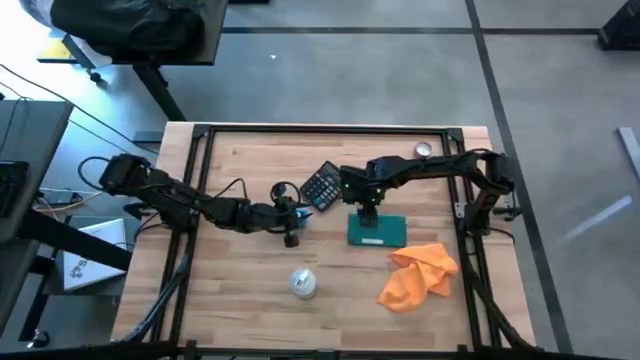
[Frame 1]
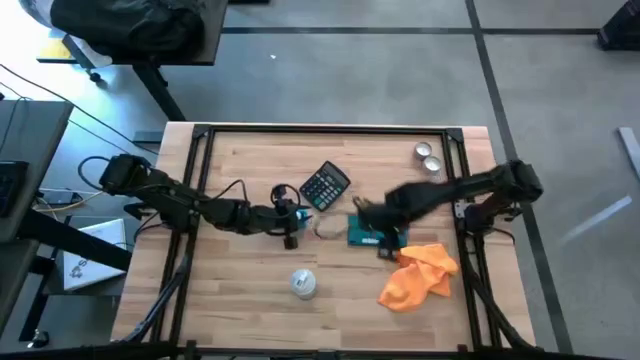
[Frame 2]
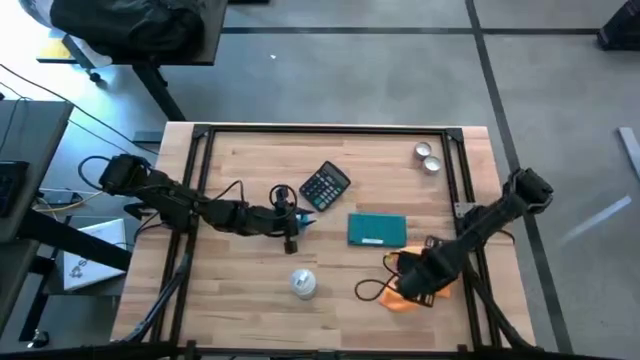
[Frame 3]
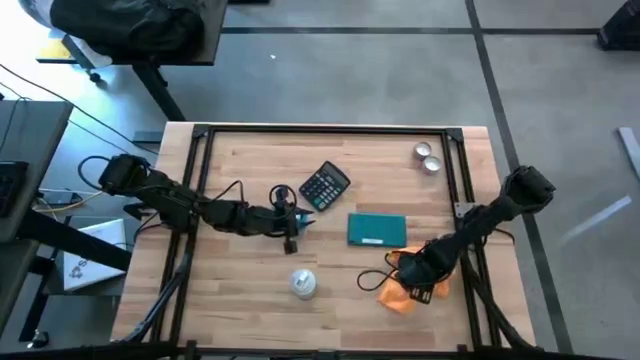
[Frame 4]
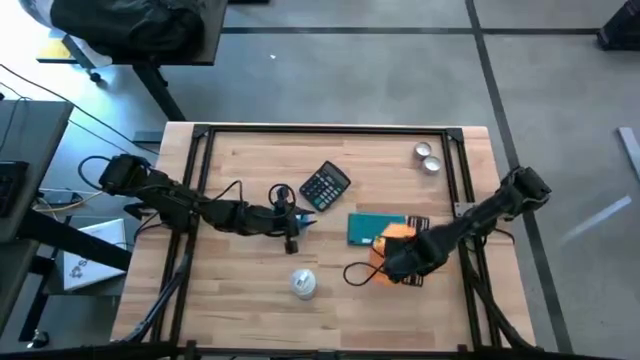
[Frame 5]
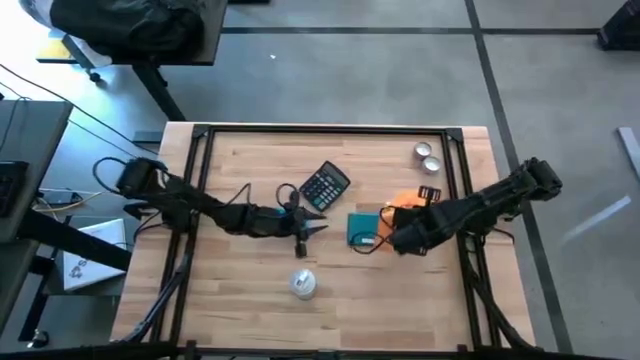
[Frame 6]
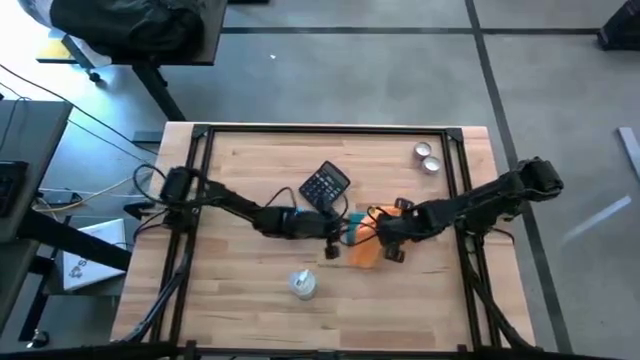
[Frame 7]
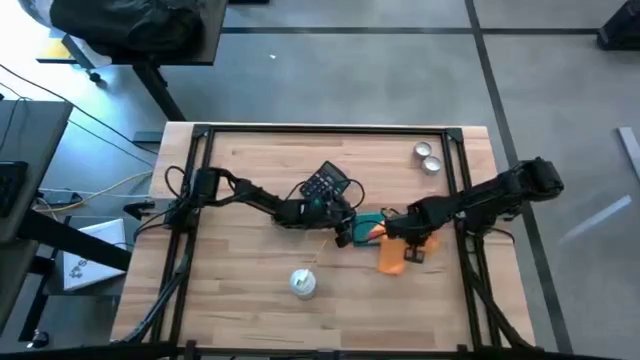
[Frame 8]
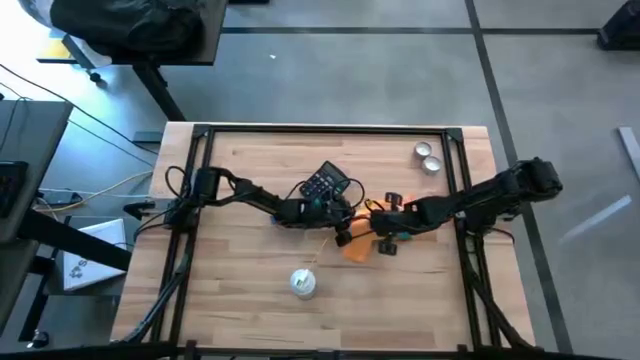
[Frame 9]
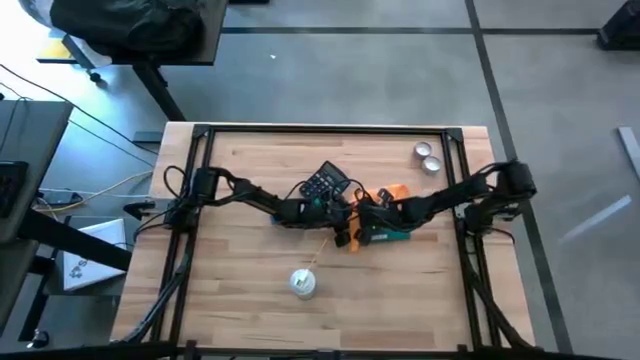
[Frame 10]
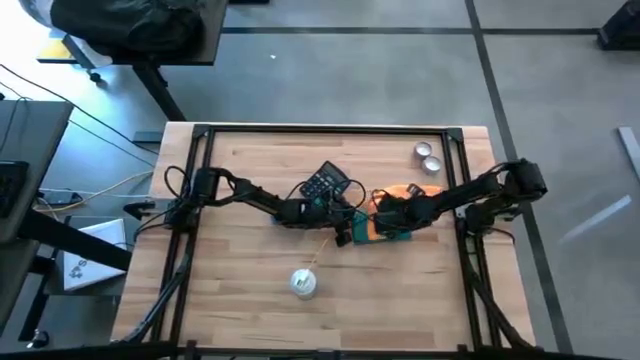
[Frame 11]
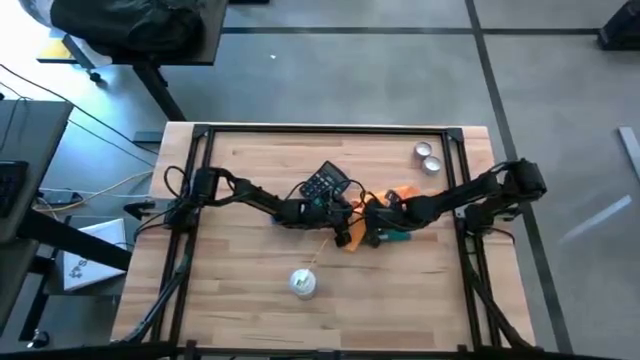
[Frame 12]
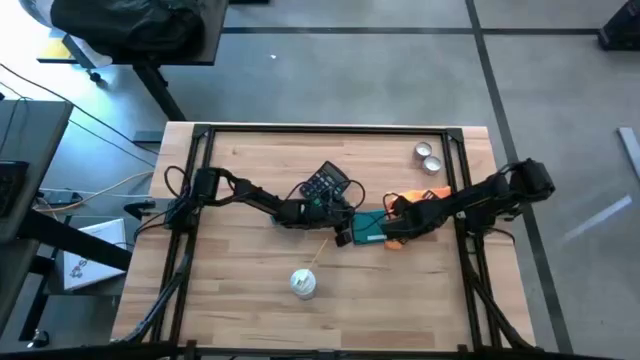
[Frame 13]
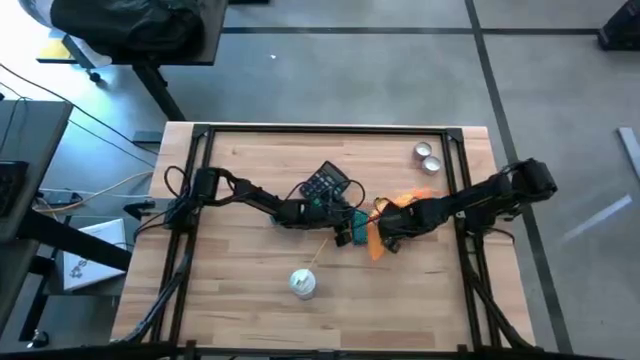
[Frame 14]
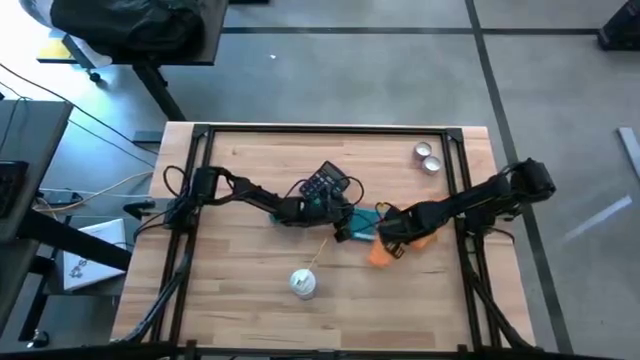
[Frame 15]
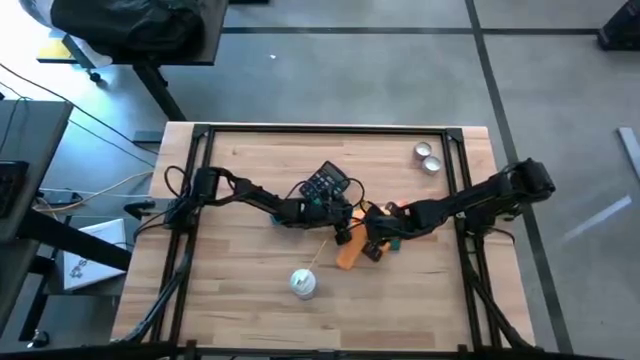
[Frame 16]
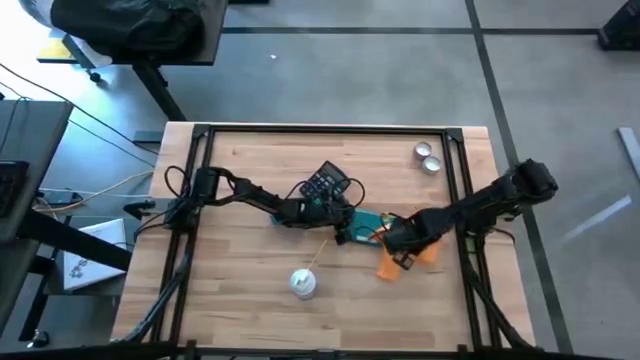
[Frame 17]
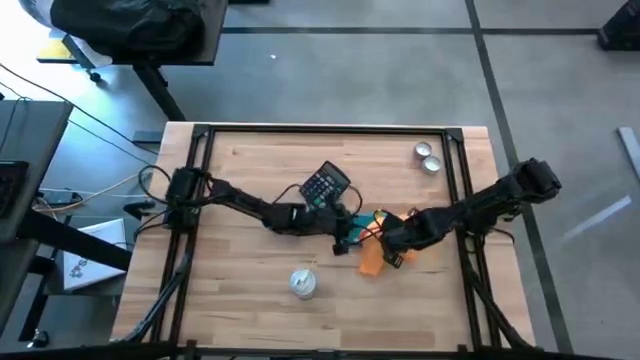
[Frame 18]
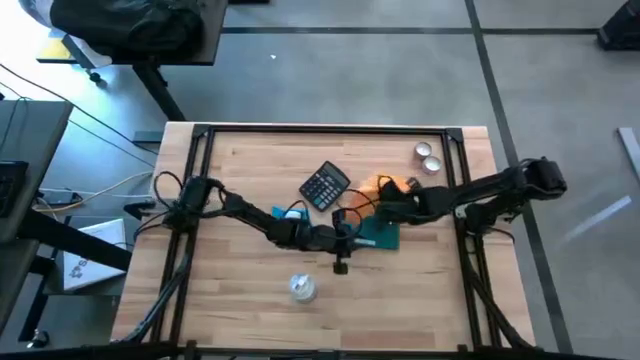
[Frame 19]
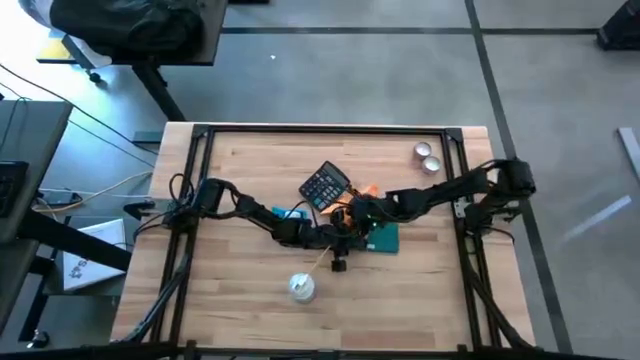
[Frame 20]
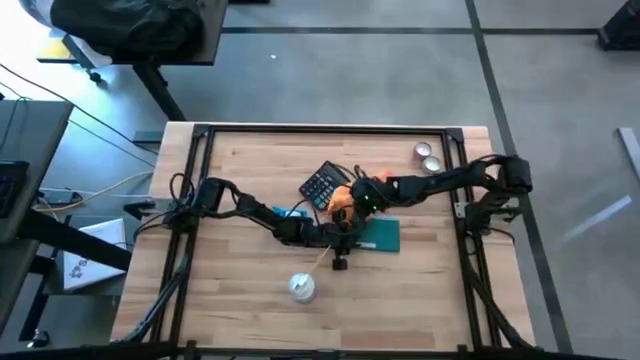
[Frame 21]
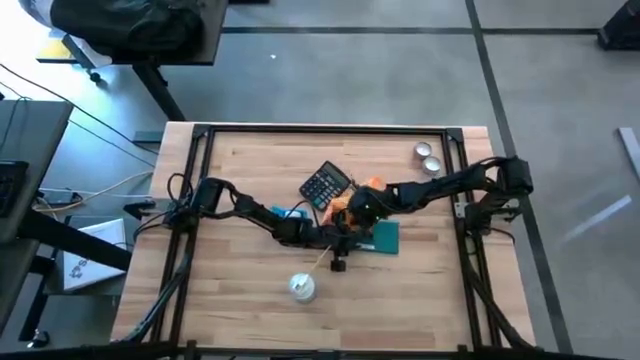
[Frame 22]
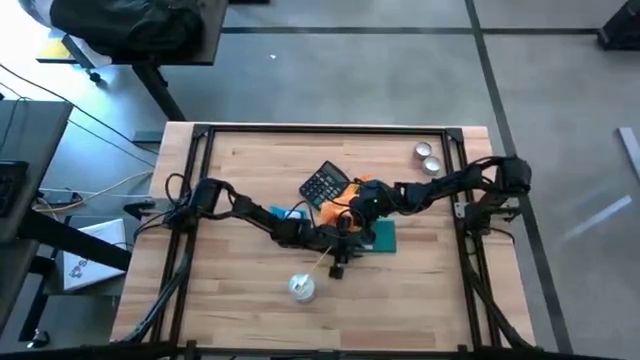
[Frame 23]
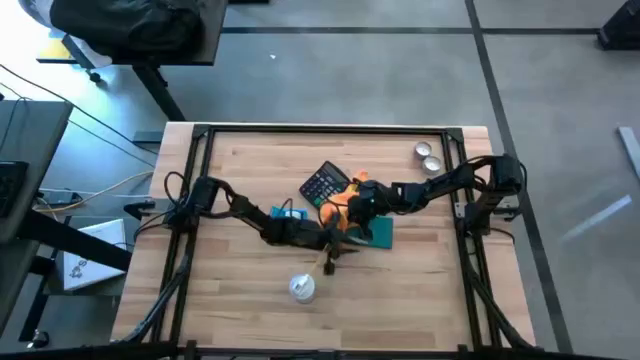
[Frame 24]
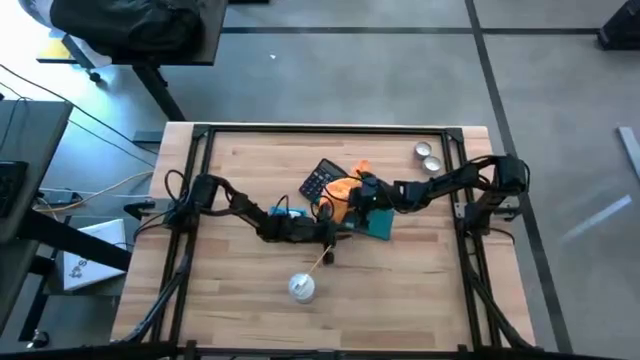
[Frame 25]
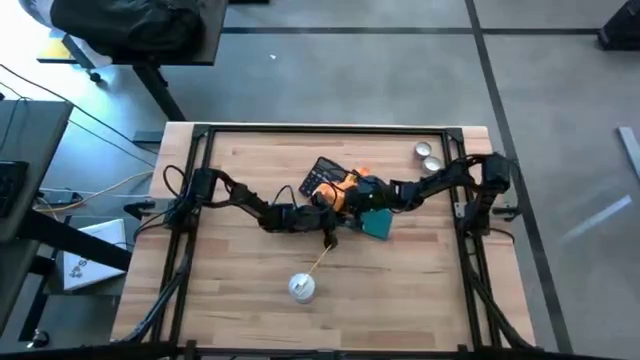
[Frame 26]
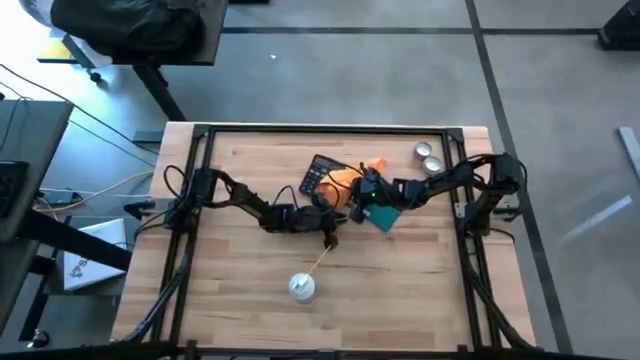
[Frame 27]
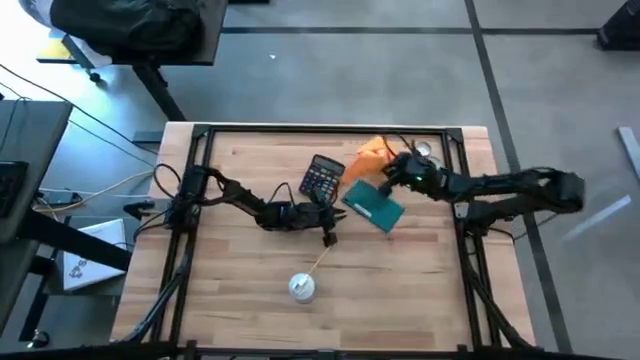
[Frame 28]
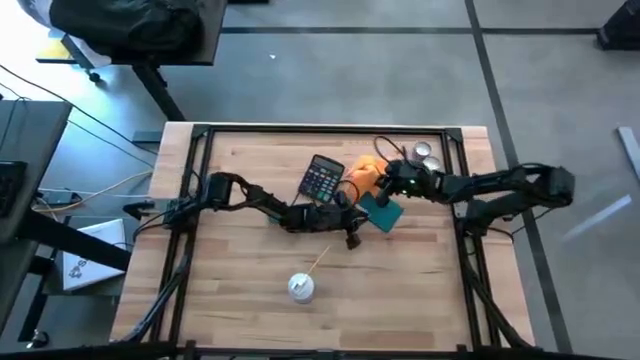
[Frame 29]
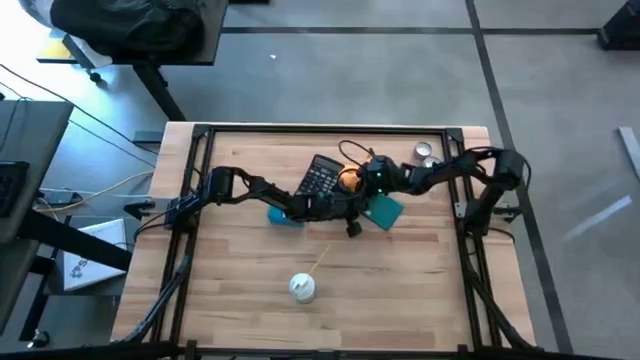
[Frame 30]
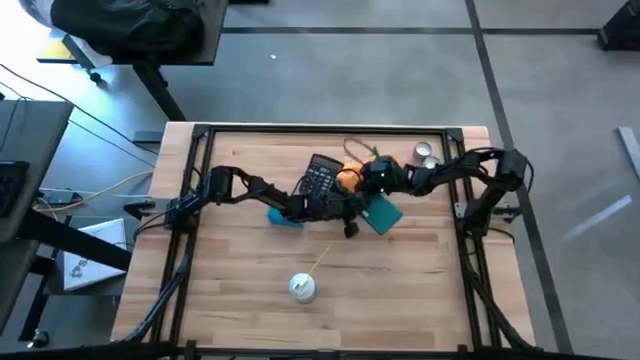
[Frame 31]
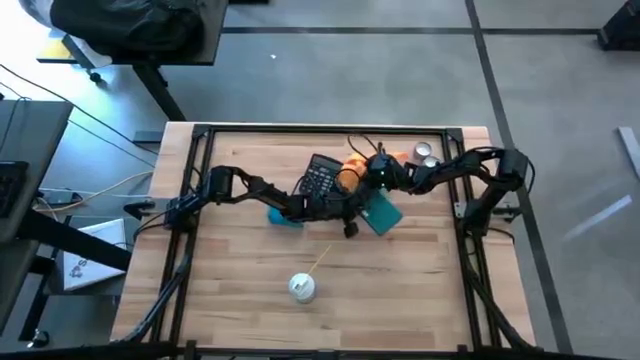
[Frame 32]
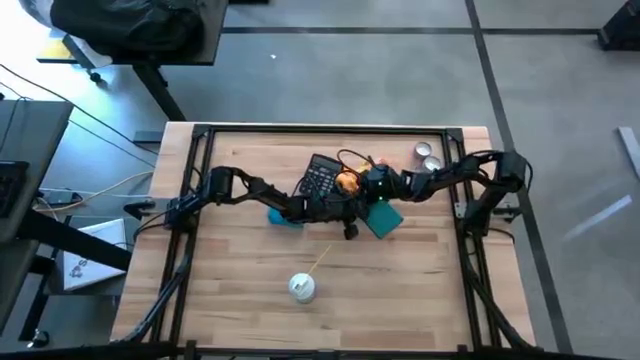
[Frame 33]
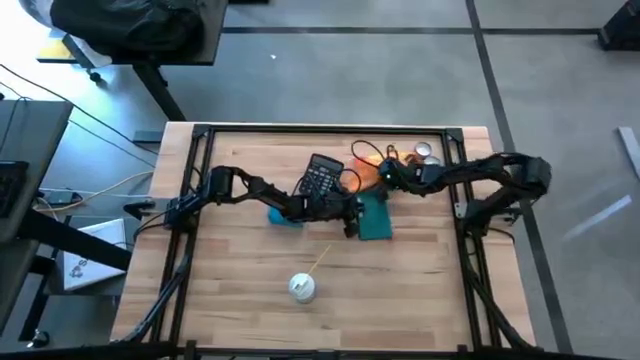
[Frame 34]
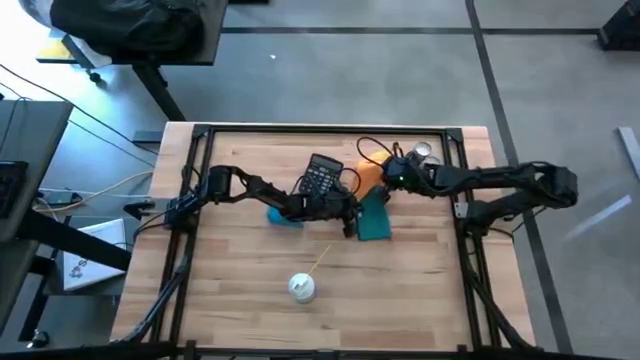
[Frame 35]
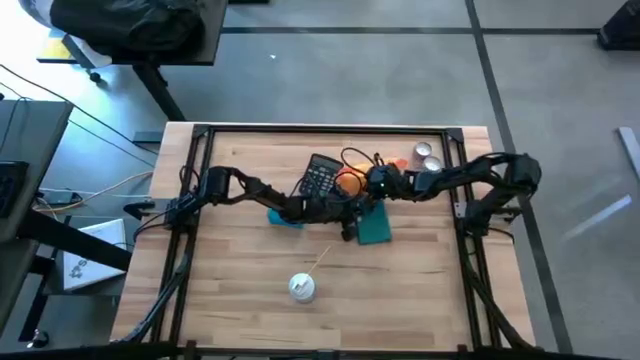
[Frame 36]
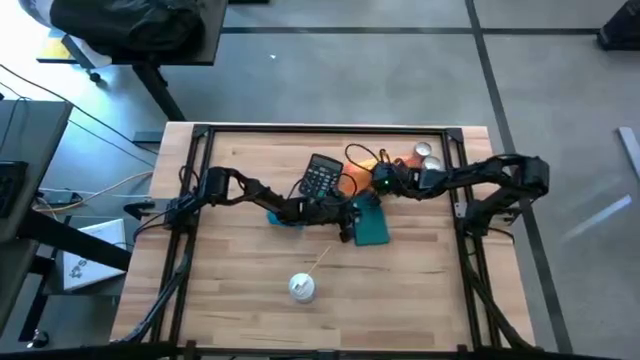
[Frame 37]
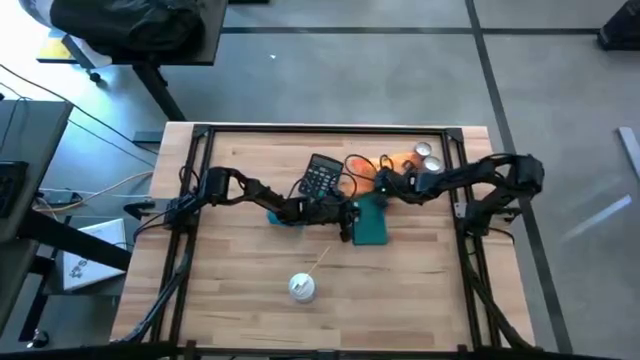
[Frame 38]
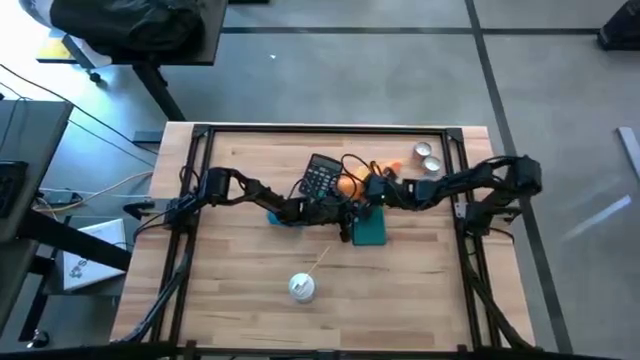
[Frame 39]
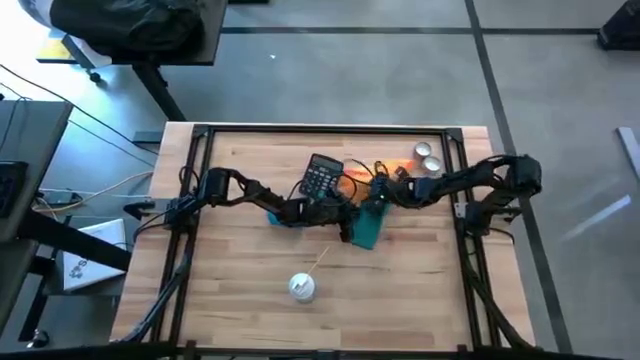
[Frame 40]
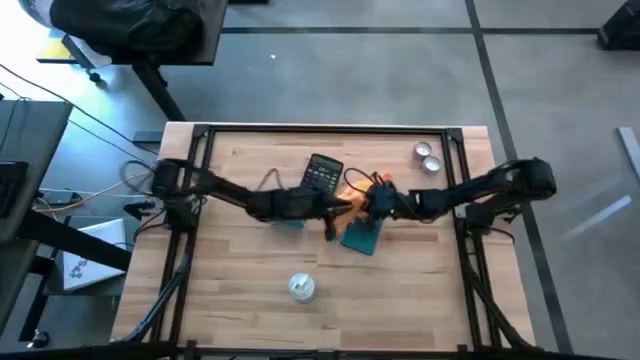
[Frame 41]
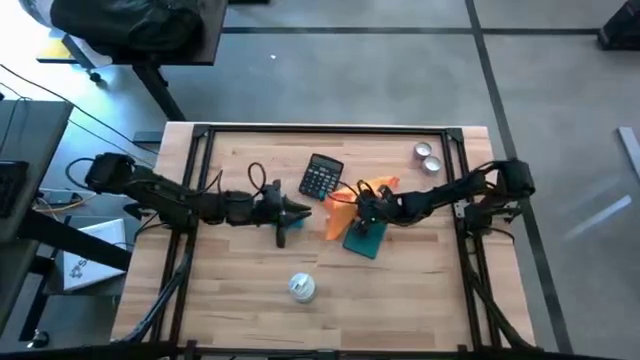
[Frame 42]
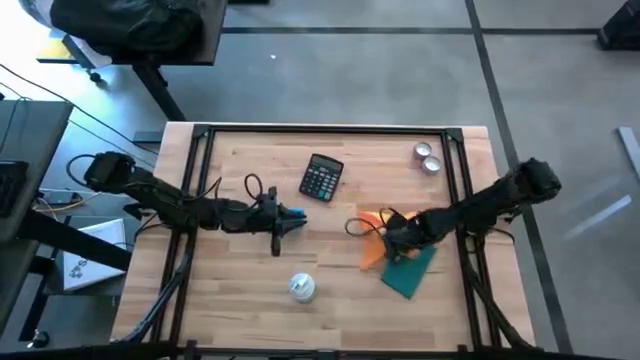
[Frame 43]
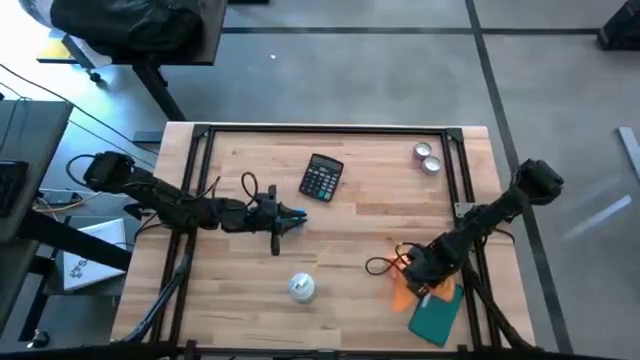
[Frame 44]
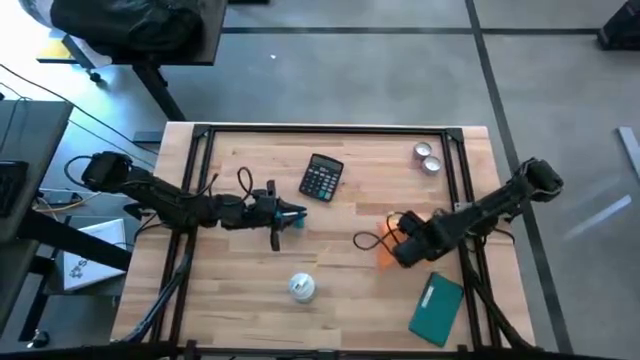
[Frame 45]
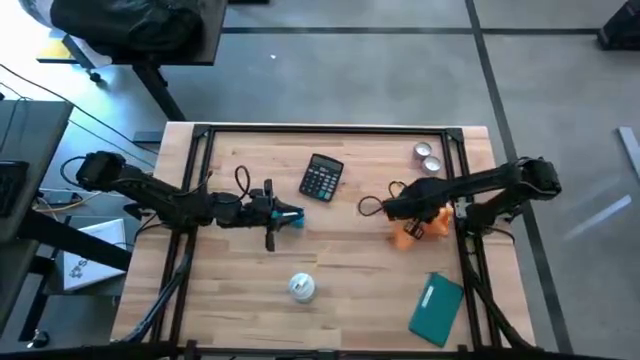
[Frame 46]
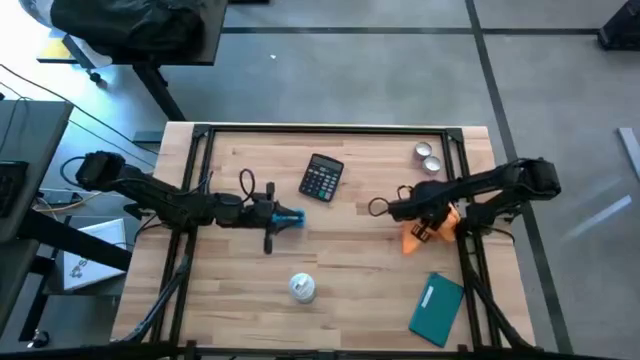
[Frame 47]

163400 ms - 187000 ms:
Task: Apply microfiber cloth
Wipe the back of the cellphone using the microfiber cloth
